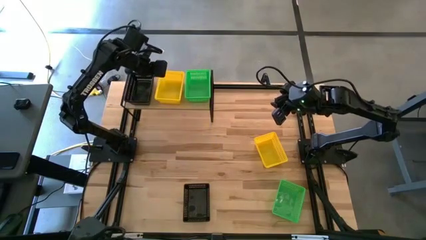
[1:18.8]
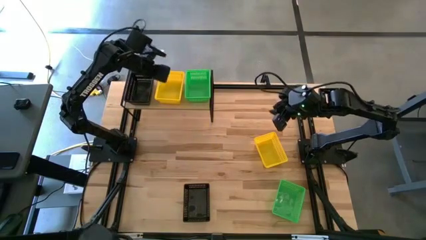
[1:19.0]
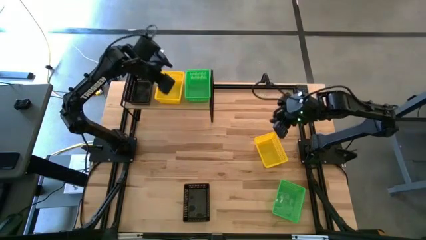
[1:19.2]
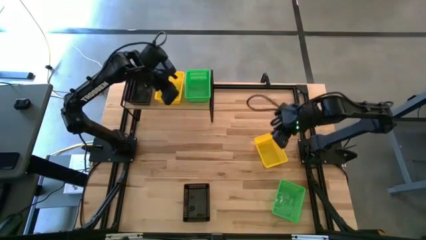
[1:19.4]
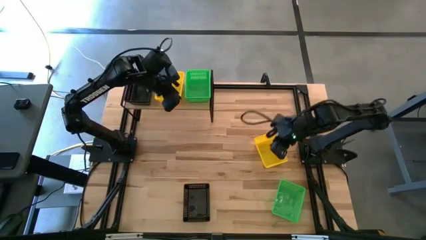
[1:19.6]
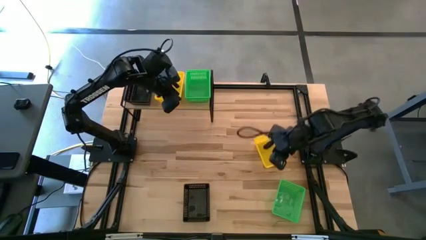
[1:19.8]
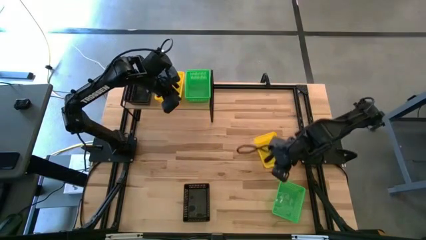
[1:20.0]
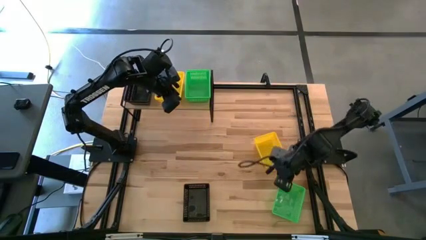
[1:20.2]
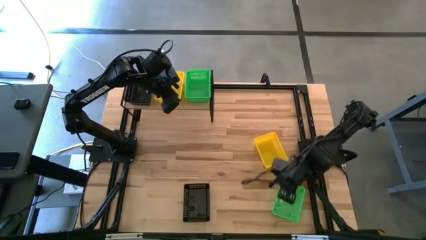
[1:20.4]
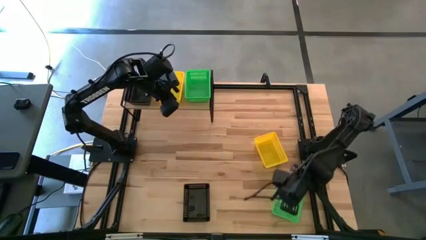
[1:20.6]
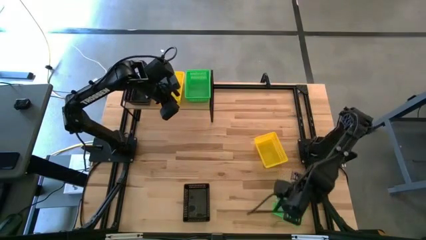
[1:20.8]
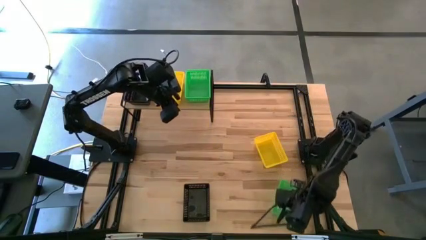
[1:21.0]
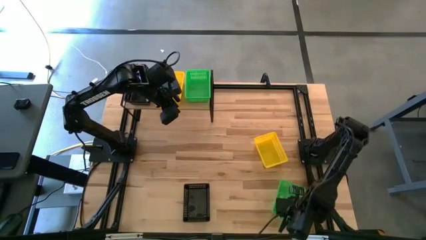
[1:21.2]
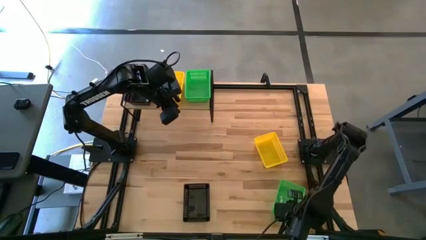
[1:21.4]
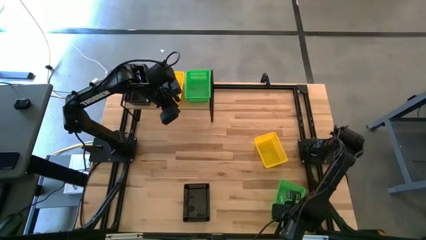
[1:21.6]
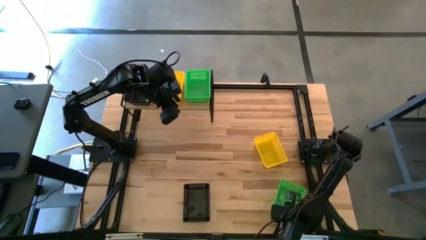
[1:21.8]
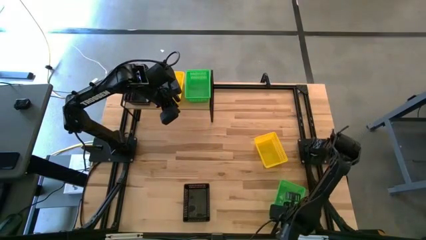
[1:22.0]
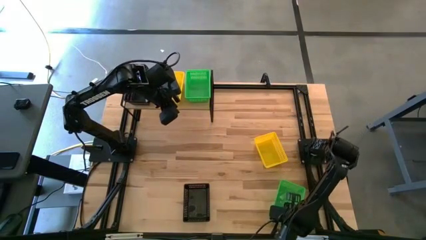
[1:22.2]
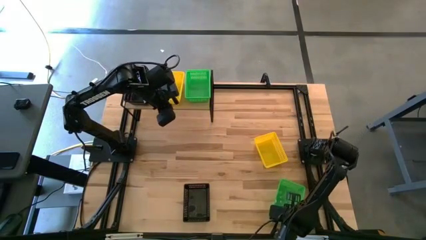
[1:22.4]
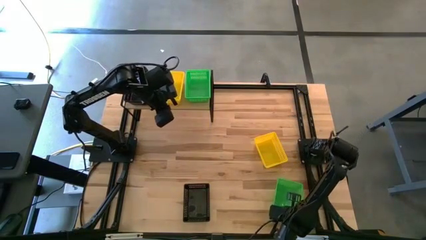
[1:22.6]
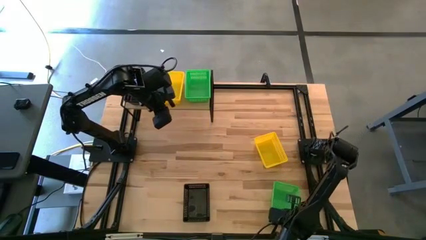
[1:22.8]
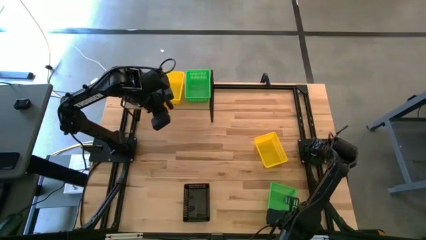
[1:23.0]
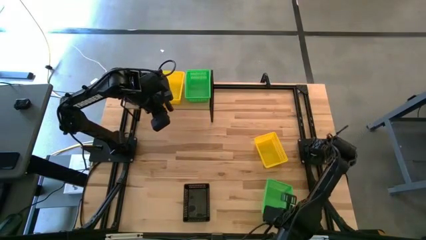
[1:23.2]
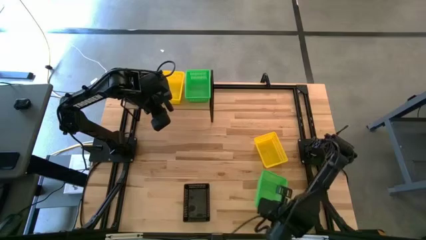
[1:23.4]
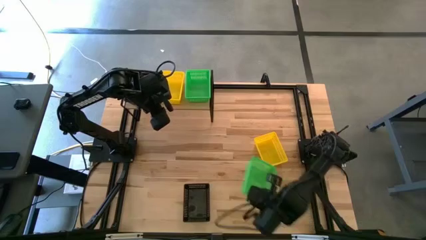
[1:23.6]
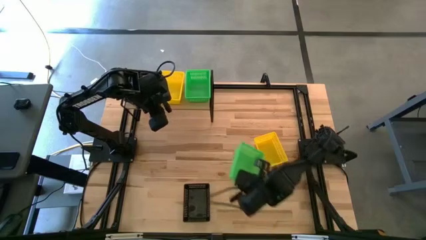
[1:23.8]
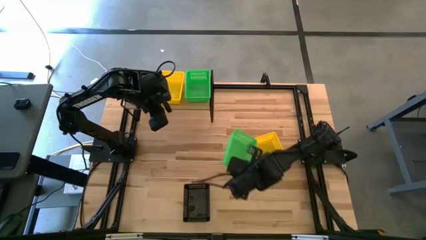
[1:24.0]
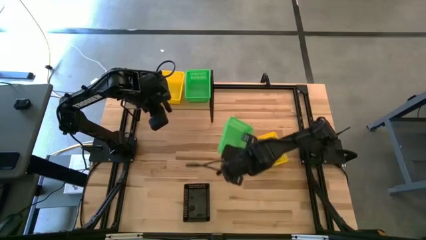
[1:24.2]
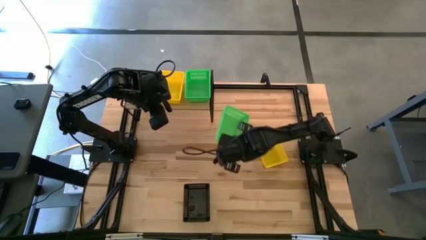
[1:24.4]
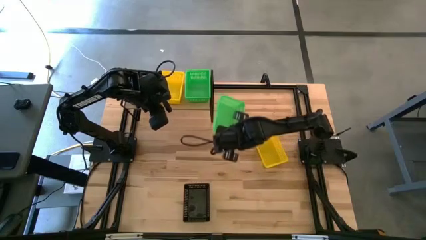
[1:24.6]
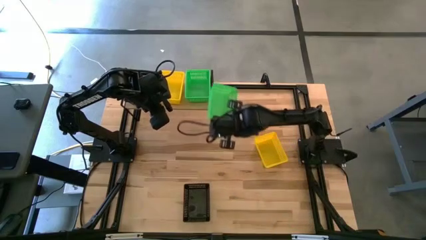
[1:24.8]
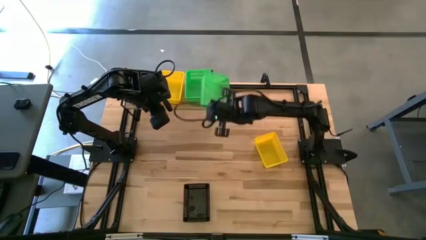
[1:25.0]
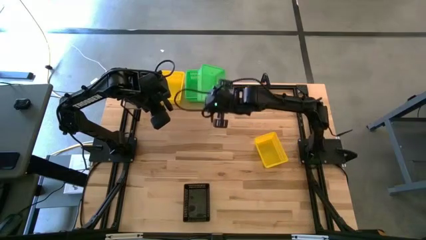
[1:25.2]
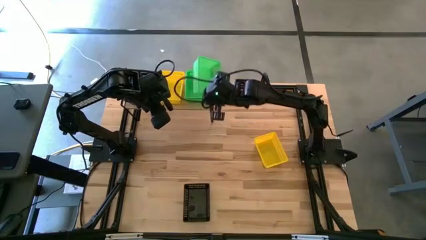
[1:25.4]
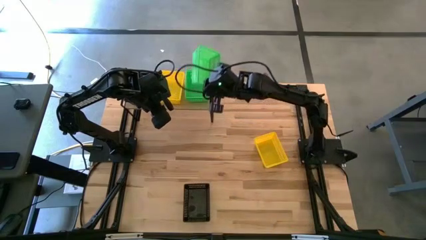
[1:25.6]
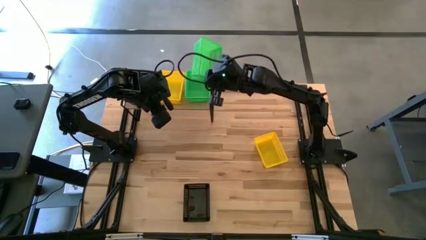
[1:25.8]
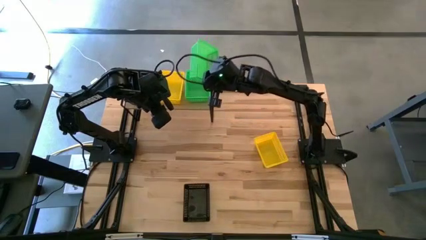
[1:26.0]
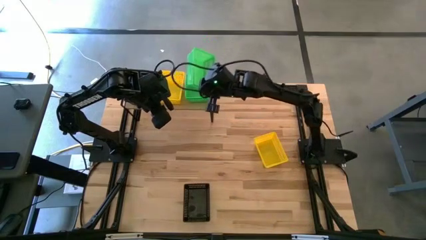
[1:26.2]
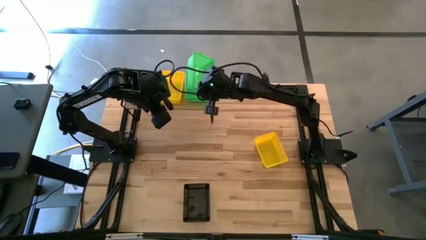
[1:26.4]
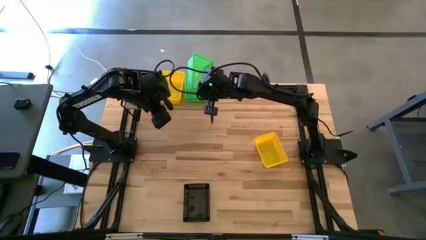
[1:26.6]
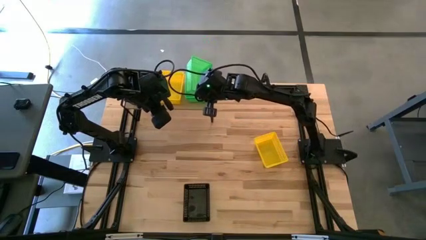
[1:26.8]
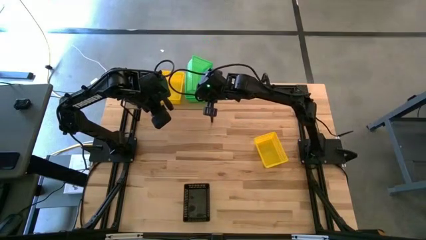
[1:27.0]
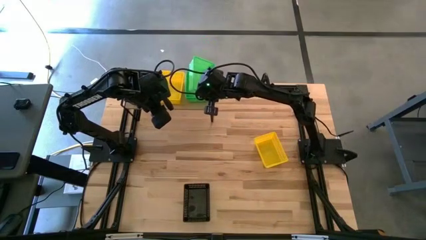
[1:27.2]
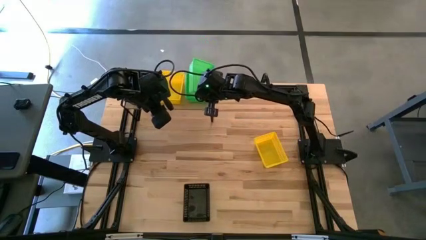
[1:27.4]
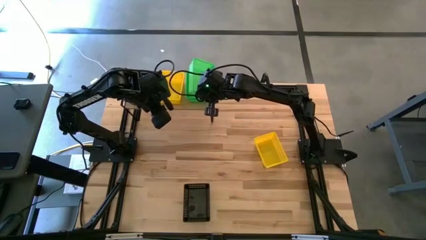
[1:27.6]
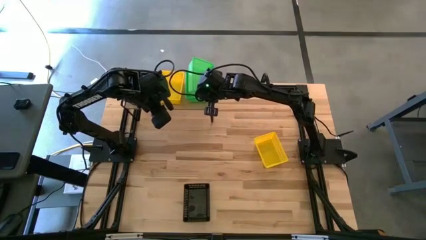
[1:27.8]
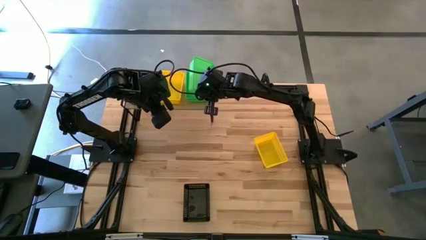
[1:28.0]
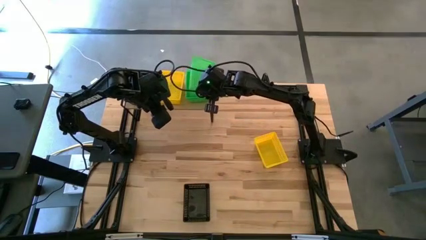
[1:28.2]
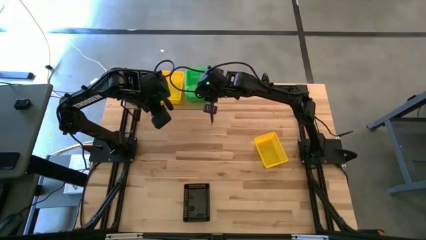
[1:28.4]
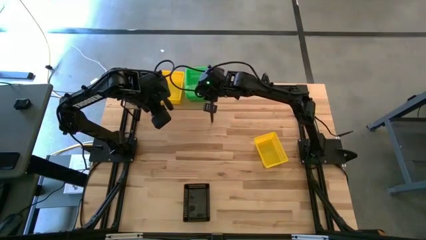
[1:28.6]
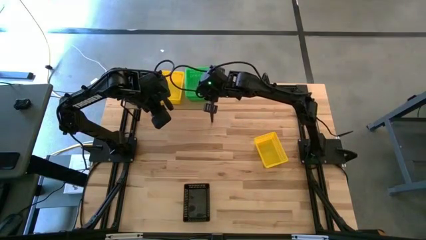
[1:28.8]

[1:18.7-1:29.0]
Task: Stack baskets on shelf by color
Stack the green bin on top of the green bin
